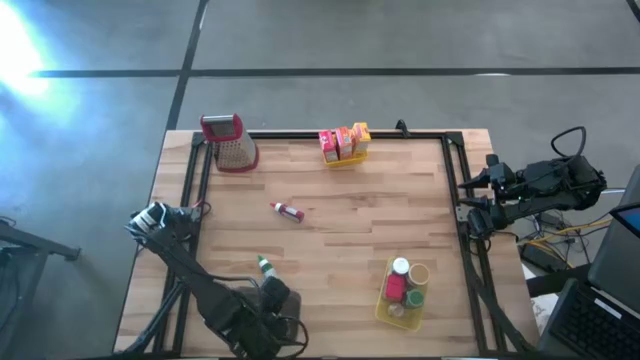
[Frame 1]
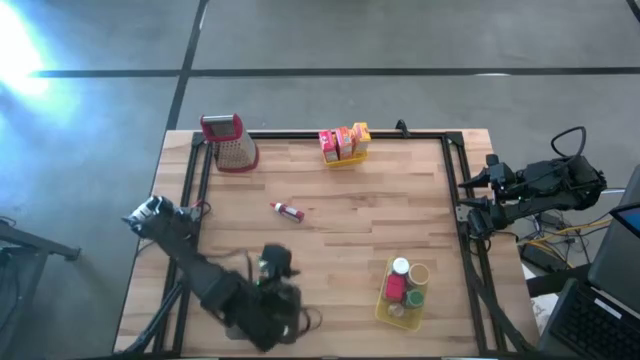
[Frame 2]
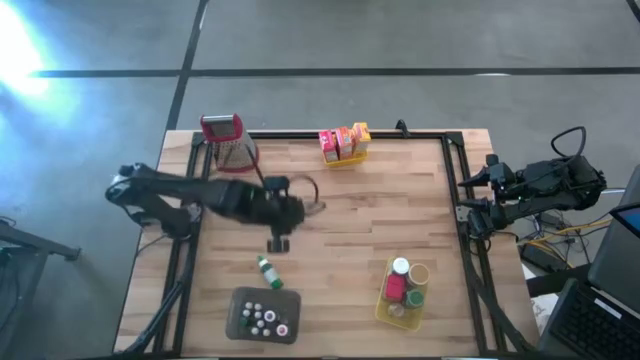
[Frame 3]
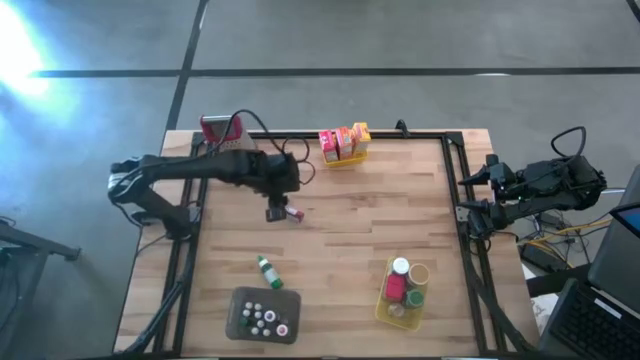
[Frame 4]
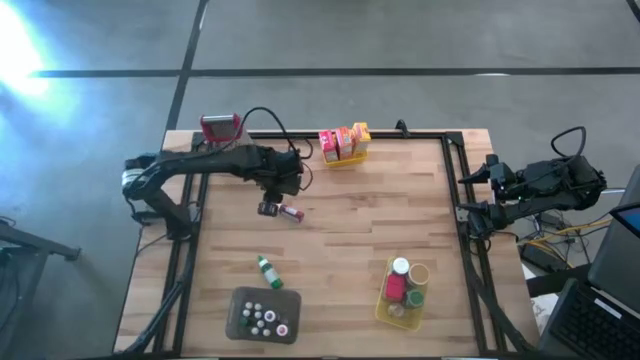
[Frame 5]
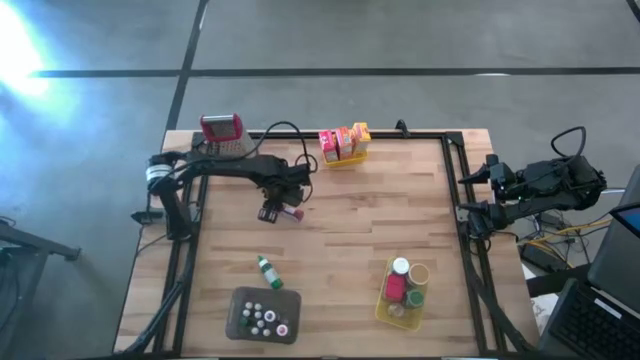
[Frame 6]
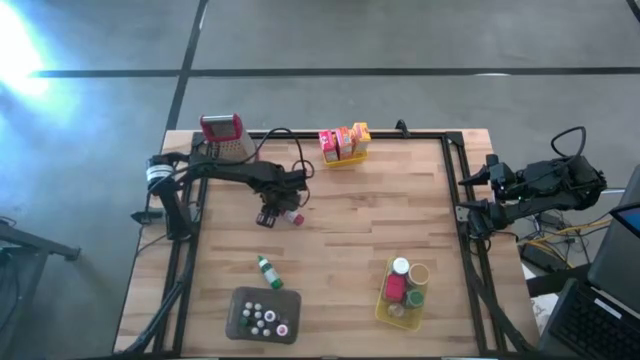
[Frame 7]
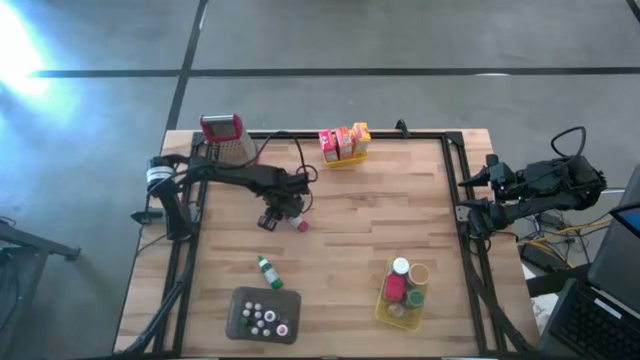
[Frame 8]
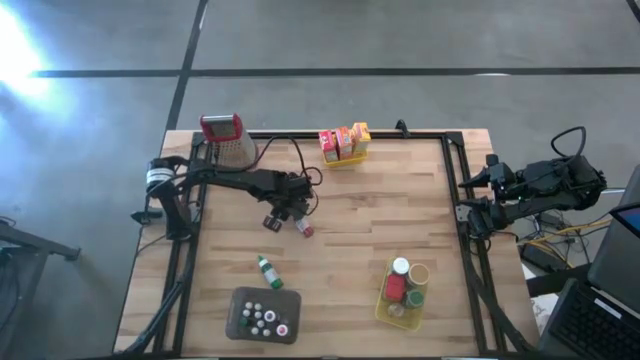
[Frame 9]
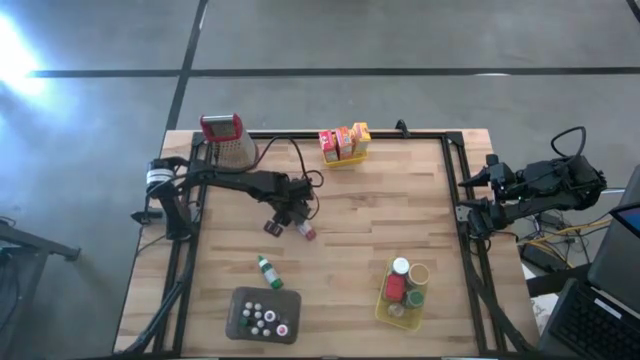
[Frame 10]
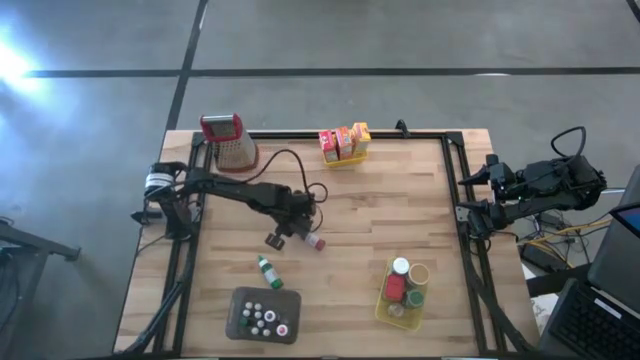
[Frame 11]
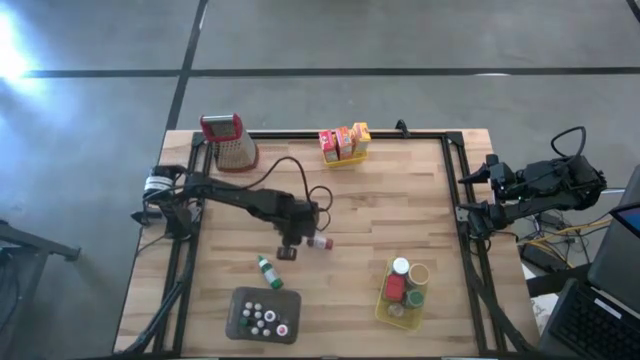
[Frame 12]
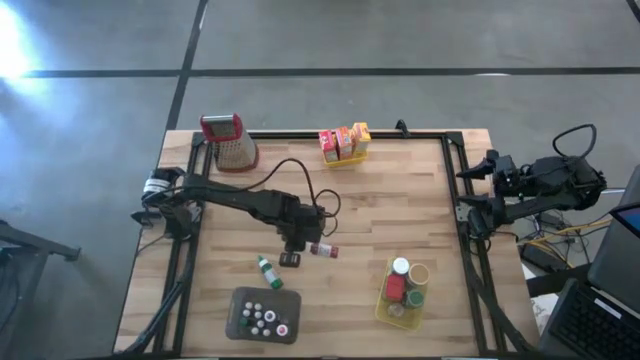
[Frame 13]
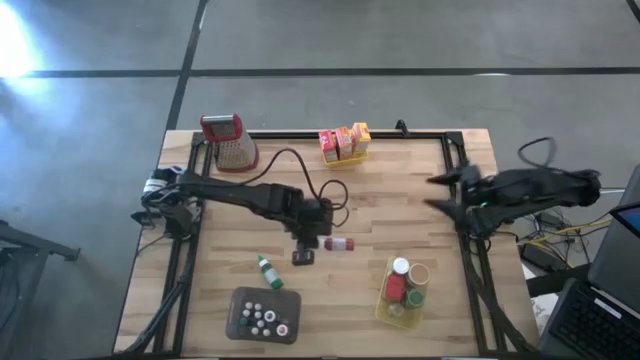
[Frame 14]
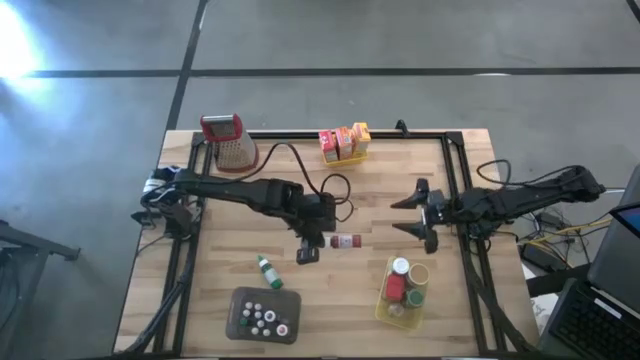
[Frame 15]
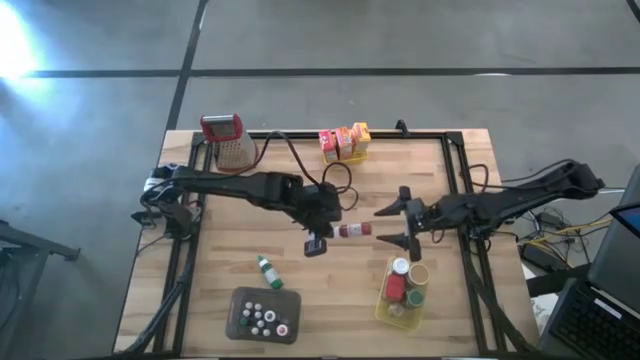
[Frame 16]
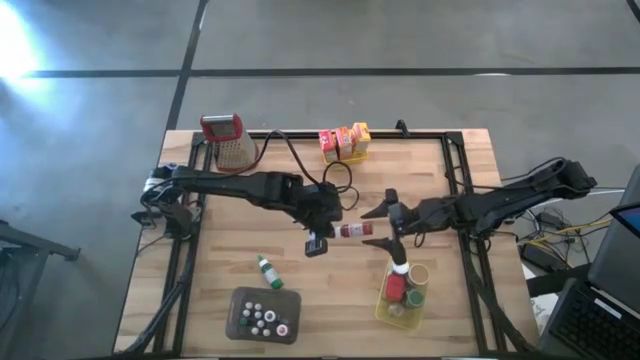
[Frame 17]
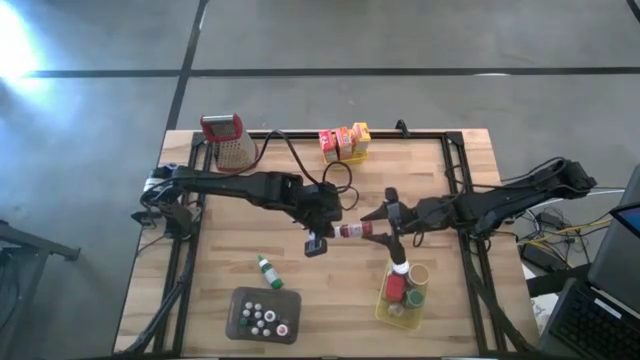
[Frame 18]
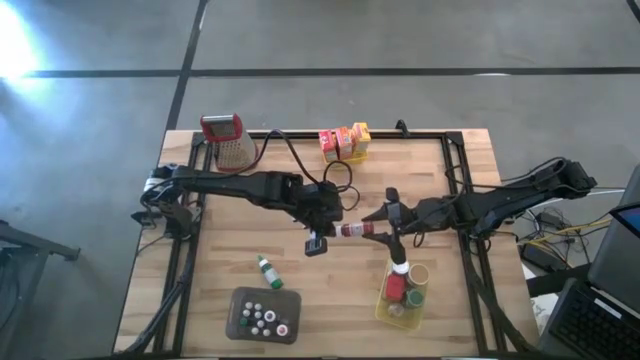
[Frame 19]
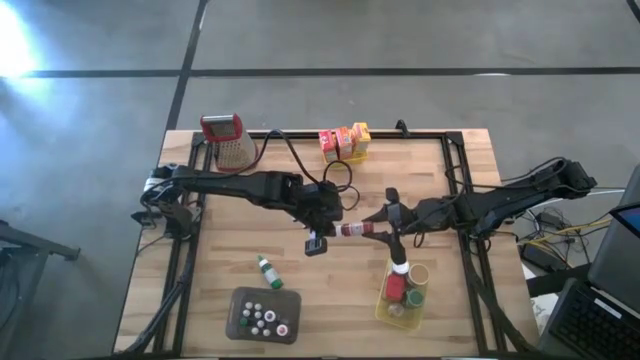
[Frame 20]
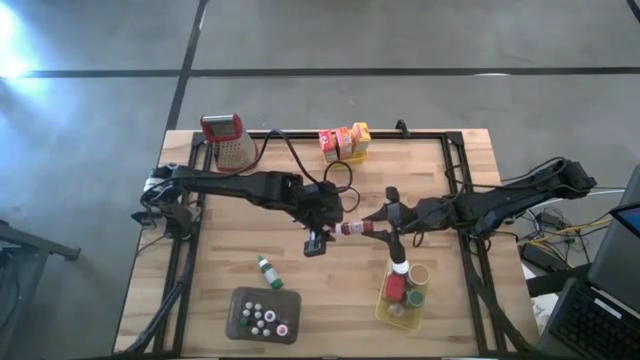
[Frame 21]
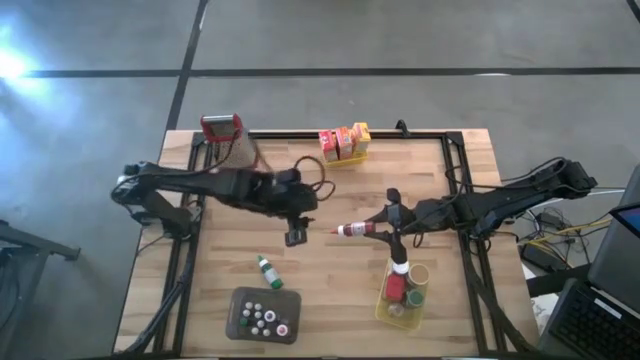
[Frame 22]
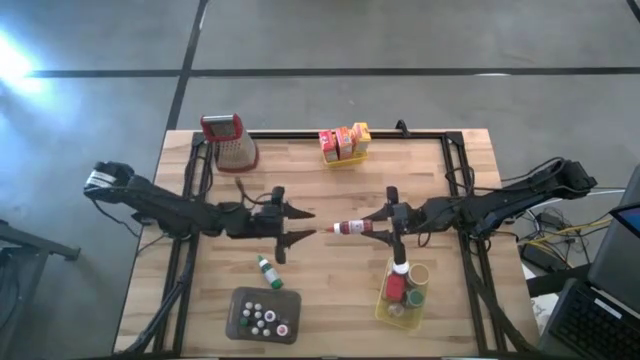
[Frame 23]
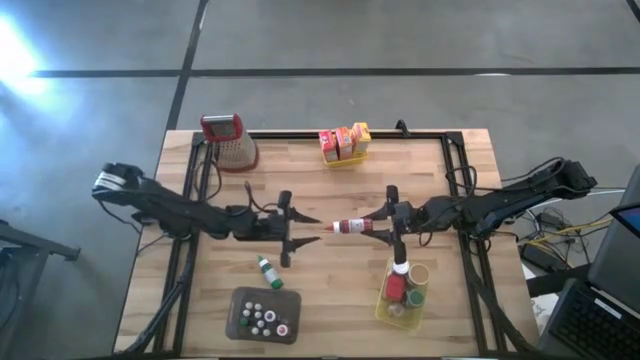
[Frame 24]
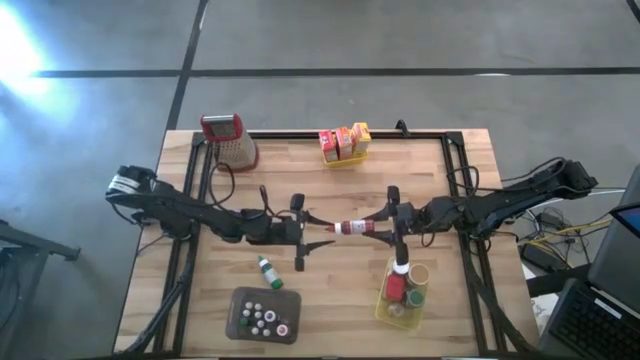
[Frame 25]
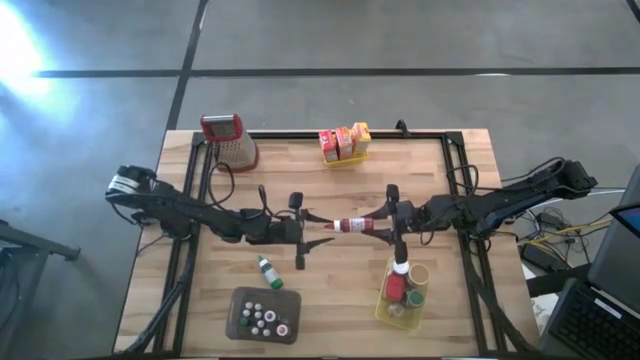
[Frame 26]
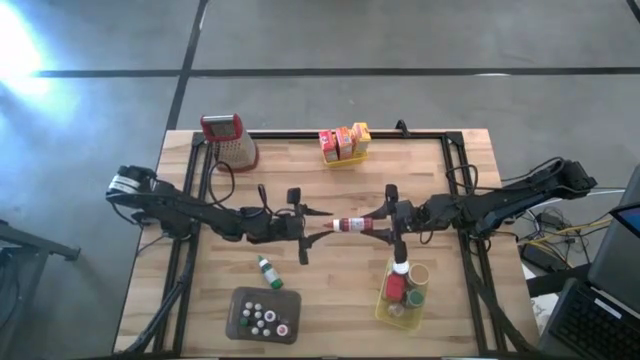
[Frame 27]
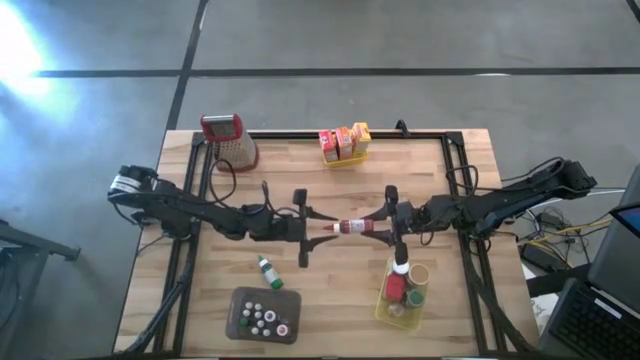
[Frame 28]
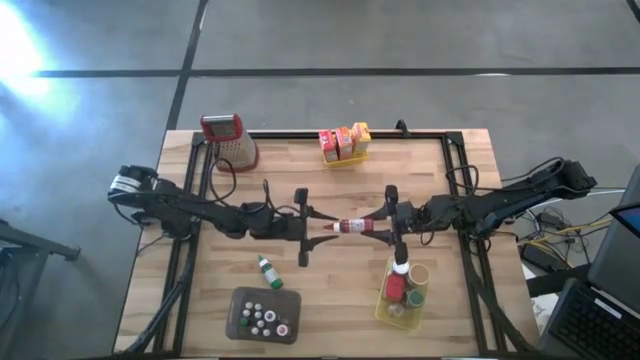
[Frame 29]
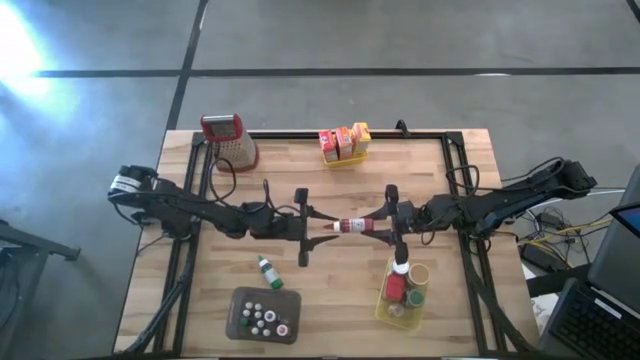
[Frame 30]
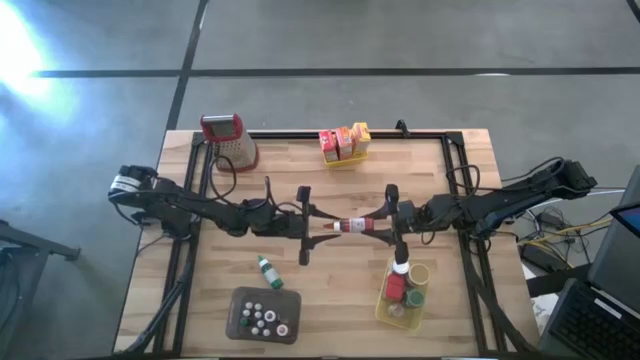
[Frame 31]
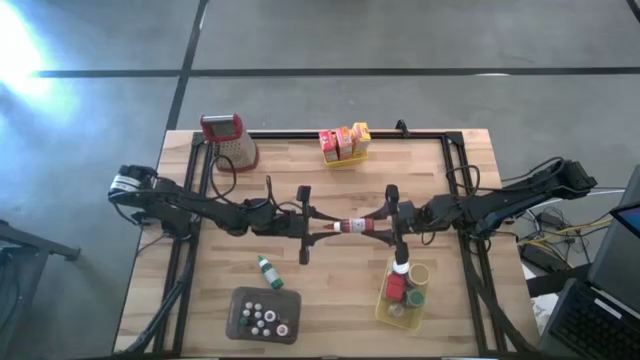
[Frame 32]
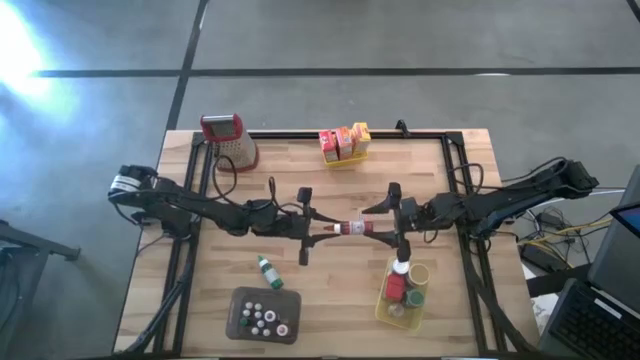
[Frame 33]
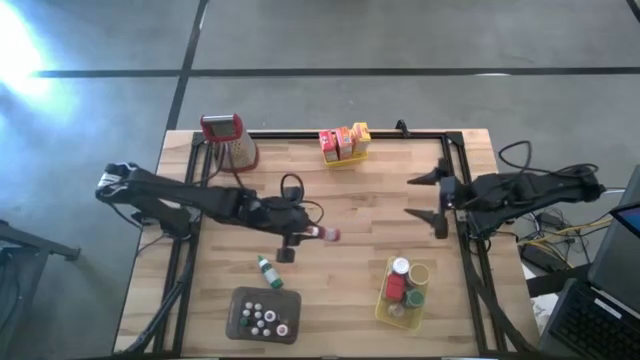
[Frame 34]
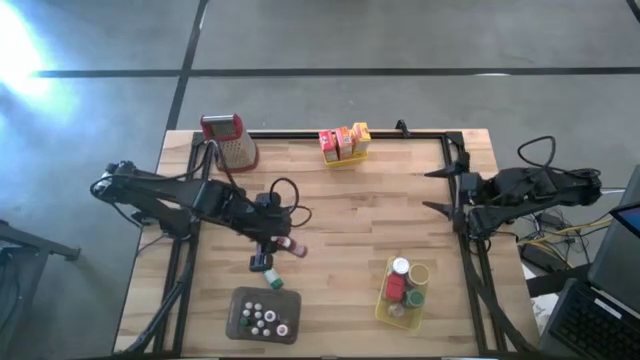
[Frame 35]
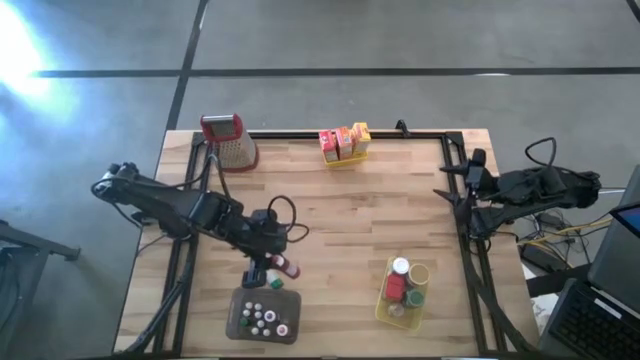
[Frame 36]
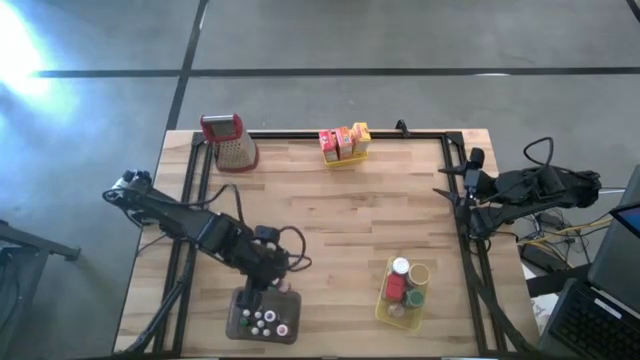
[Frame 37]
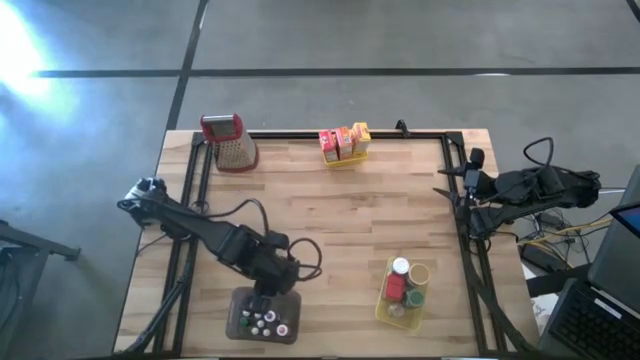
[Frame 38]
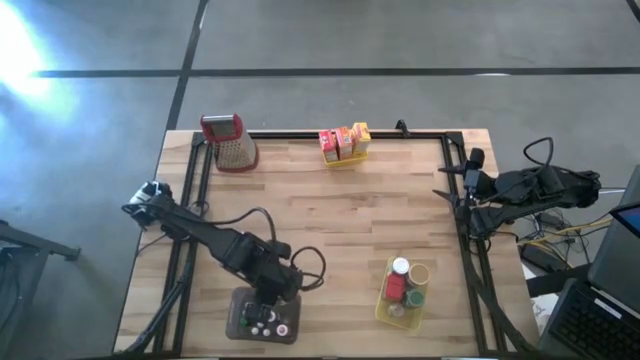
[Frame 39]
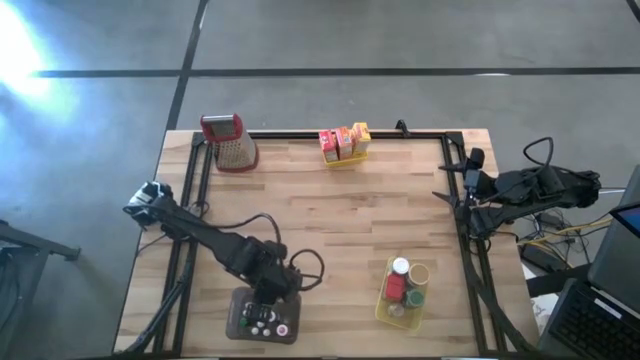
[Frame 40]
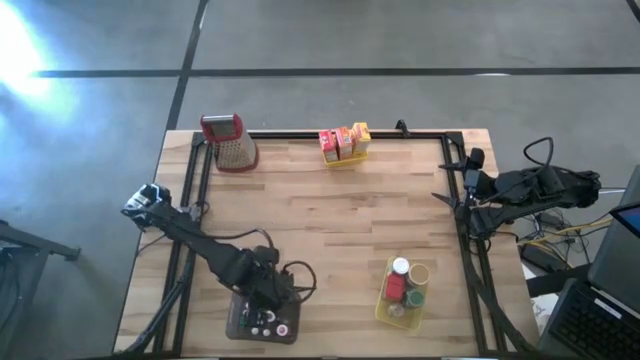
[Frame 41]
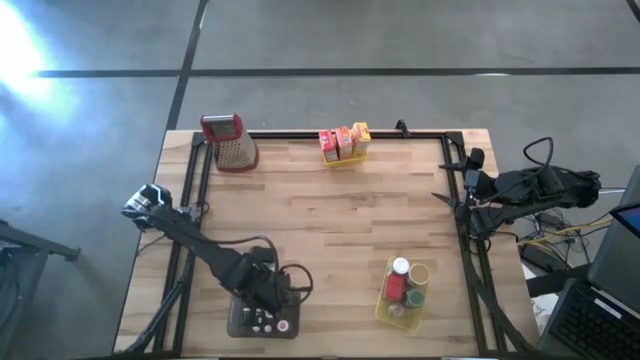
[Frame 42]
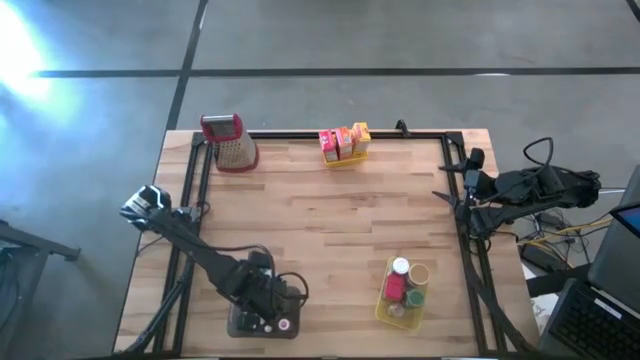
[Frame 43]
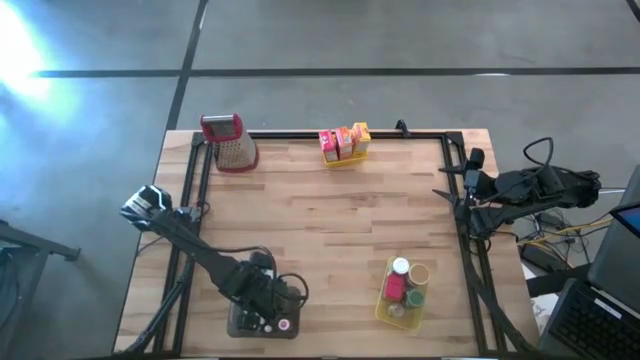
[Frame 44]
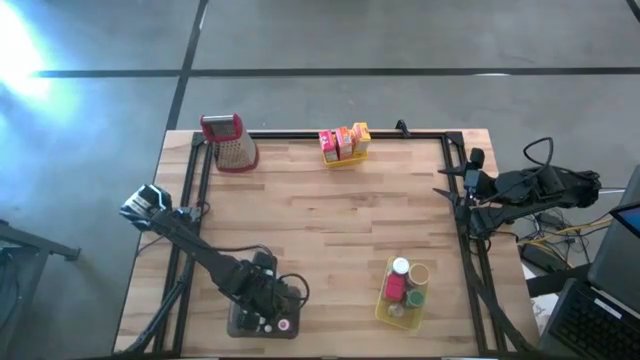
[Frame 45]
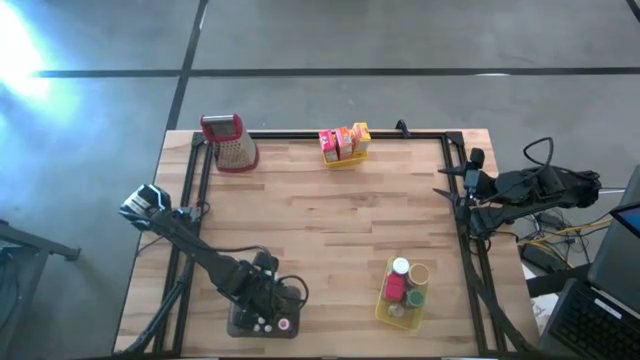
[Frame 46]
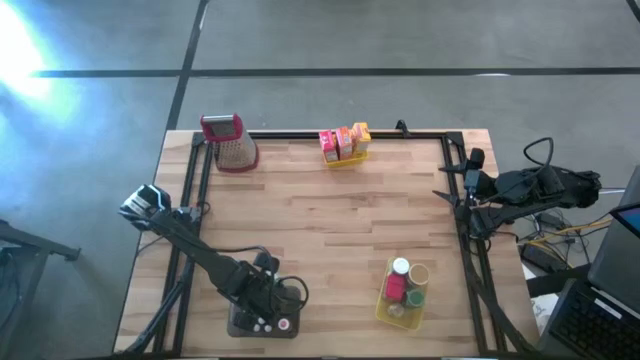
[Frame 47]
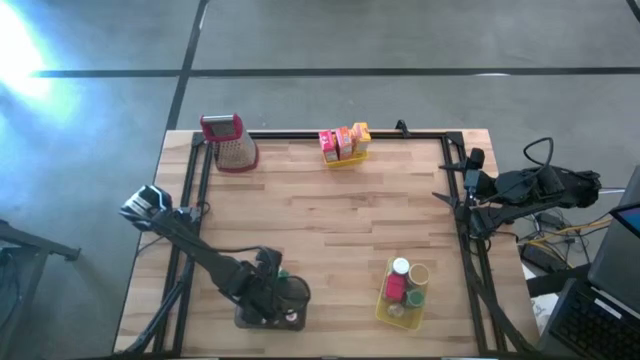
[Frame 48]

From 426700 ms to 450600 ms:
Task: Pick & Place Kitchen Items
Put the red food coloring bottle into the black bin
